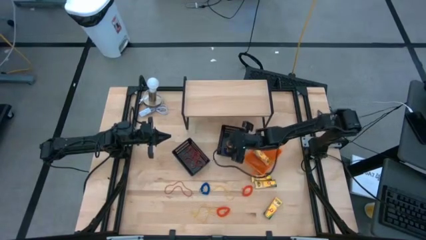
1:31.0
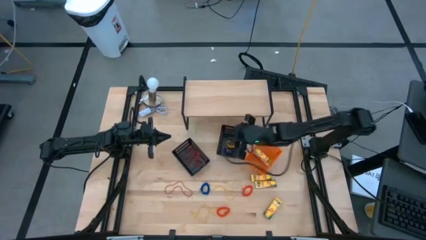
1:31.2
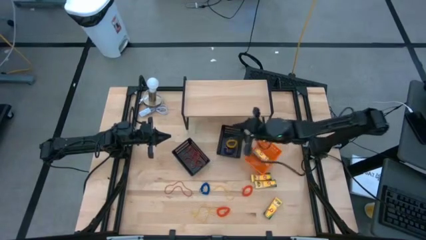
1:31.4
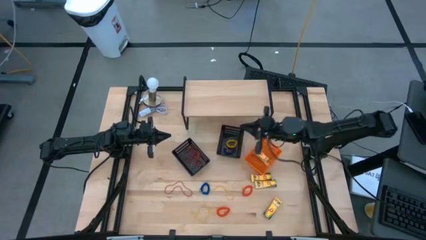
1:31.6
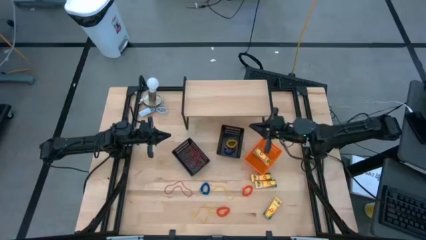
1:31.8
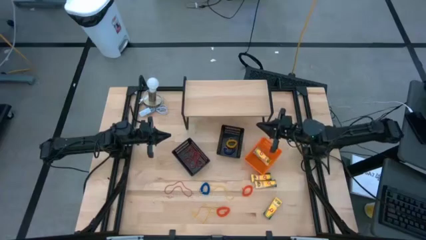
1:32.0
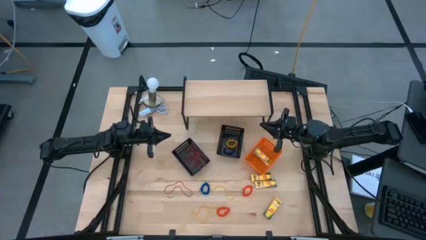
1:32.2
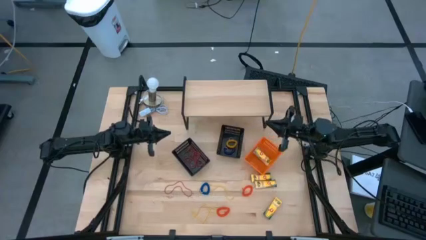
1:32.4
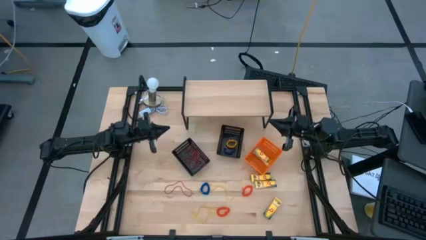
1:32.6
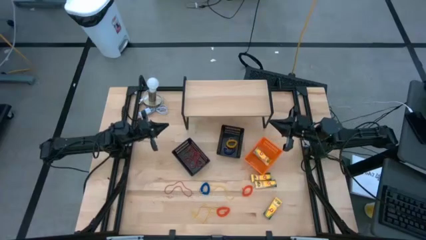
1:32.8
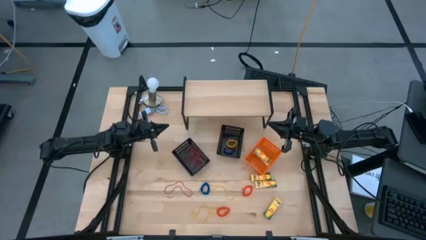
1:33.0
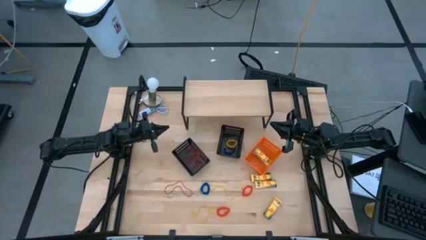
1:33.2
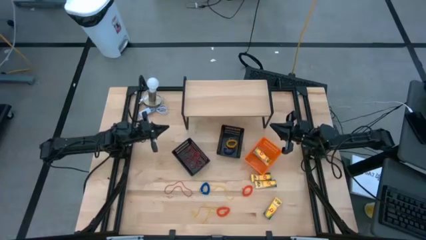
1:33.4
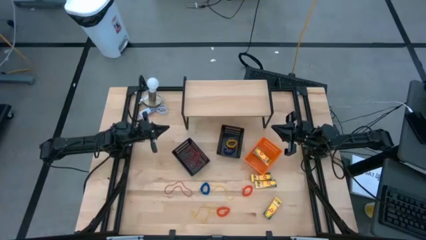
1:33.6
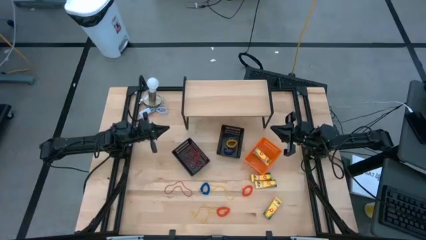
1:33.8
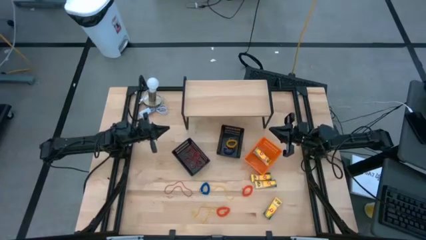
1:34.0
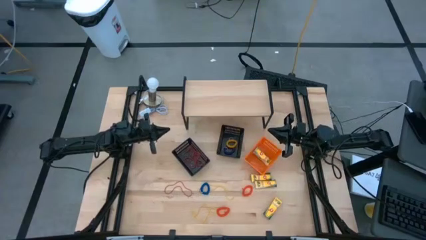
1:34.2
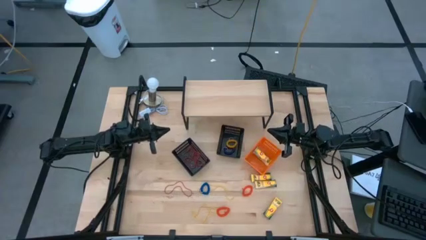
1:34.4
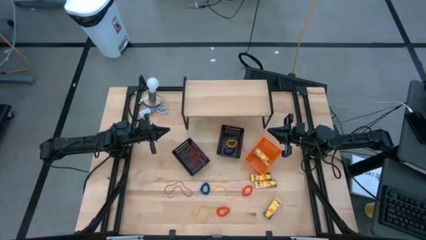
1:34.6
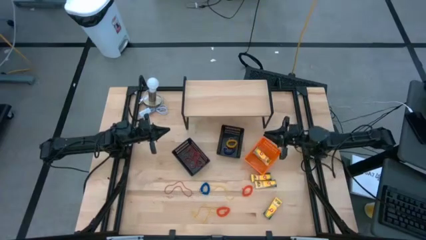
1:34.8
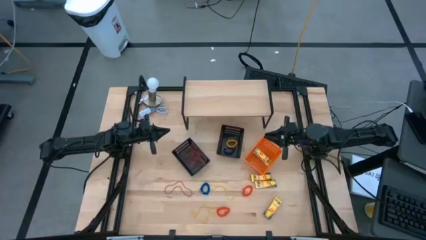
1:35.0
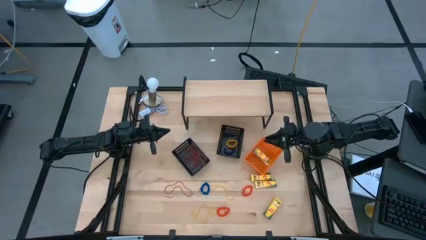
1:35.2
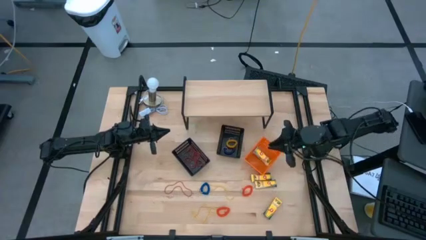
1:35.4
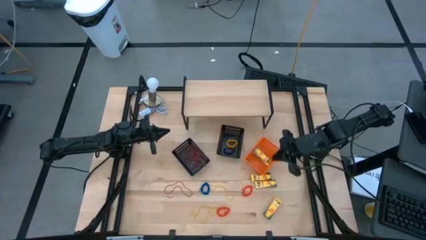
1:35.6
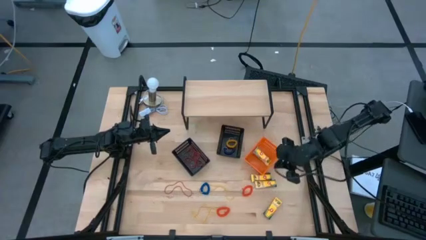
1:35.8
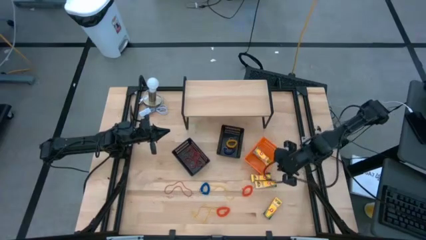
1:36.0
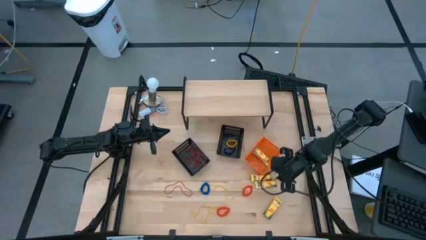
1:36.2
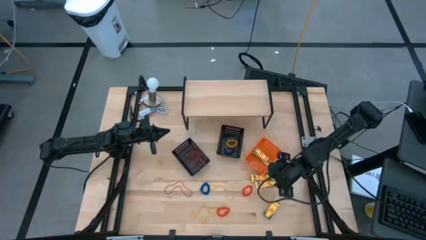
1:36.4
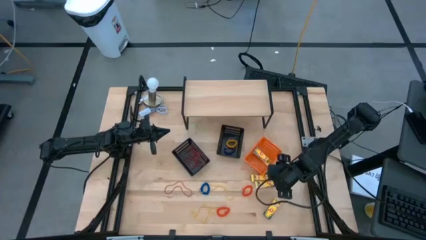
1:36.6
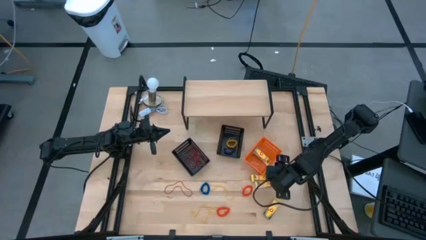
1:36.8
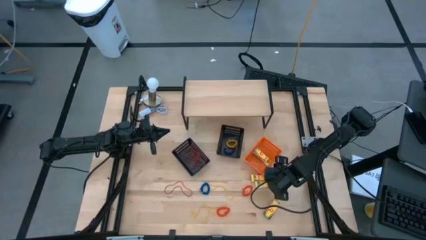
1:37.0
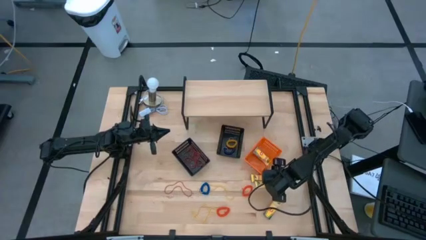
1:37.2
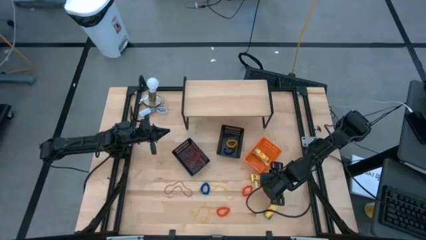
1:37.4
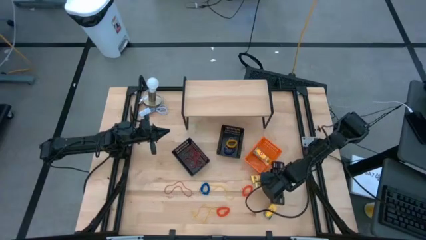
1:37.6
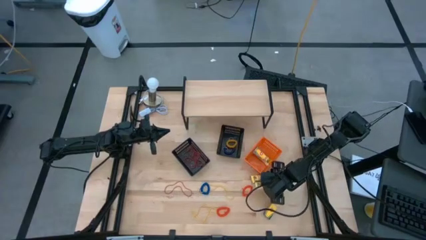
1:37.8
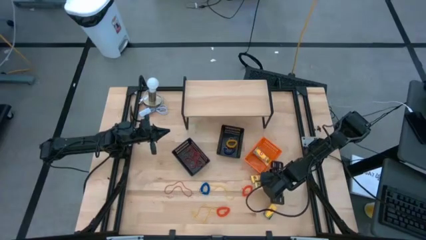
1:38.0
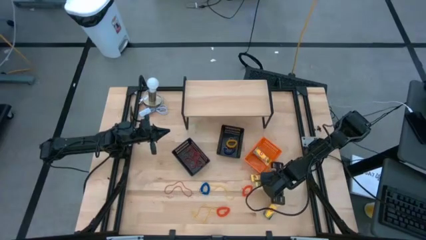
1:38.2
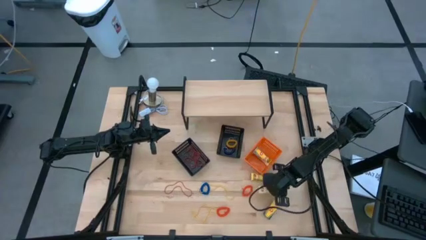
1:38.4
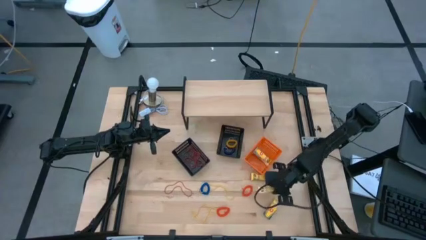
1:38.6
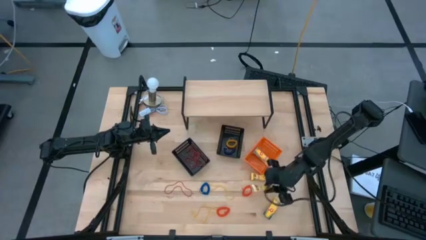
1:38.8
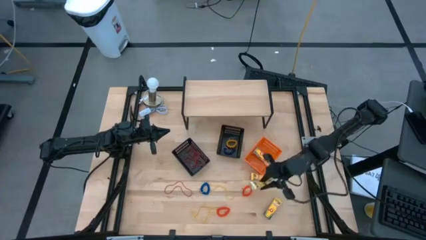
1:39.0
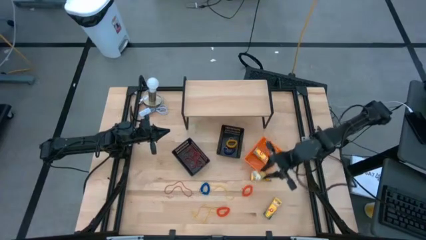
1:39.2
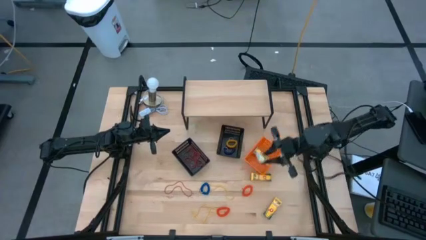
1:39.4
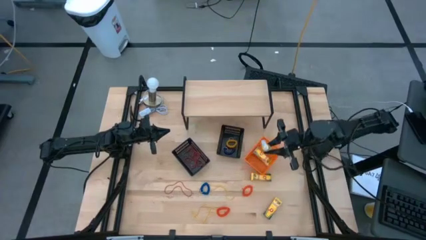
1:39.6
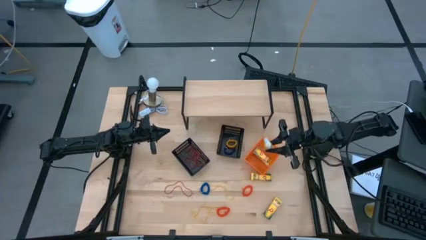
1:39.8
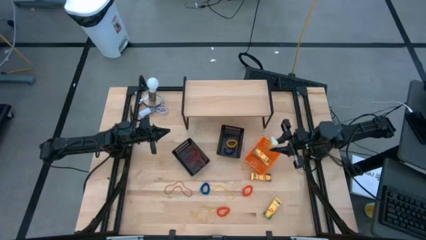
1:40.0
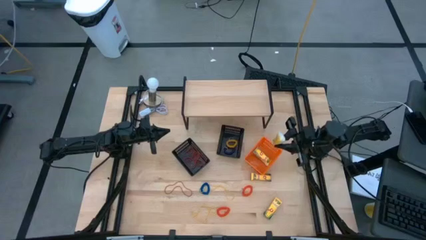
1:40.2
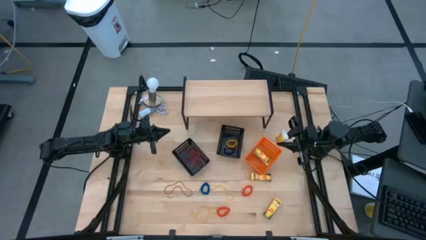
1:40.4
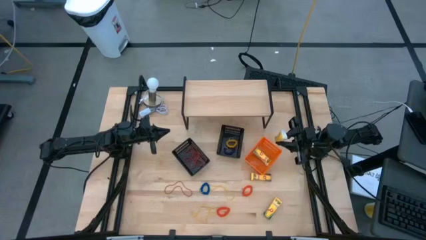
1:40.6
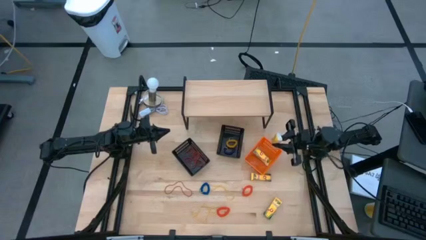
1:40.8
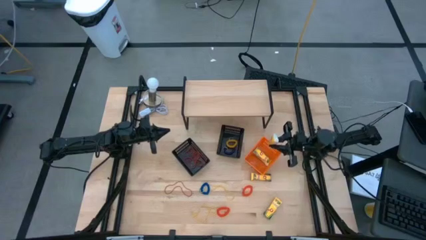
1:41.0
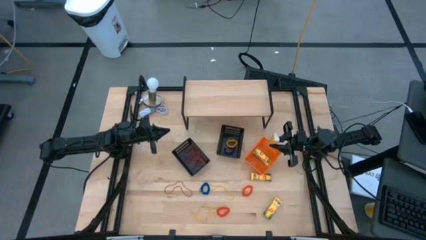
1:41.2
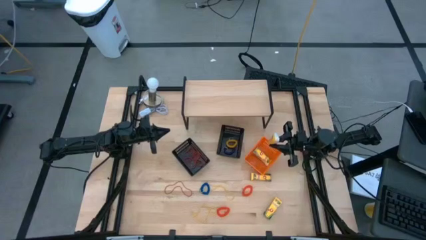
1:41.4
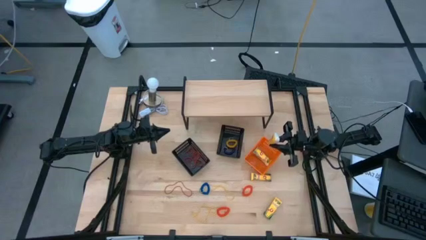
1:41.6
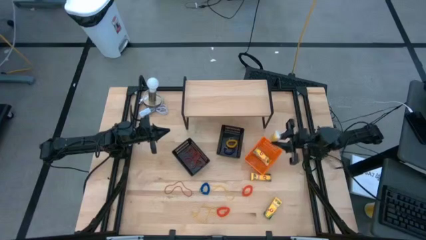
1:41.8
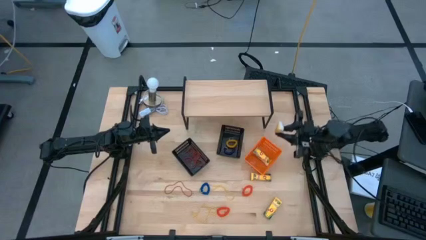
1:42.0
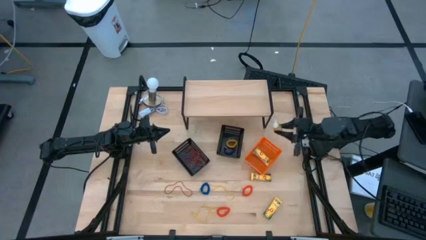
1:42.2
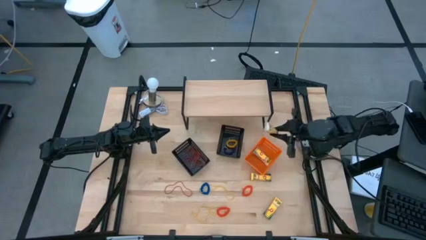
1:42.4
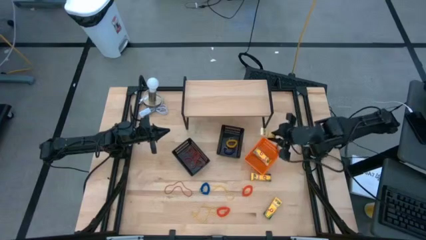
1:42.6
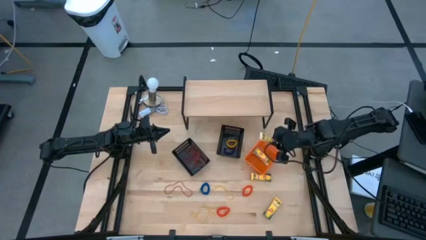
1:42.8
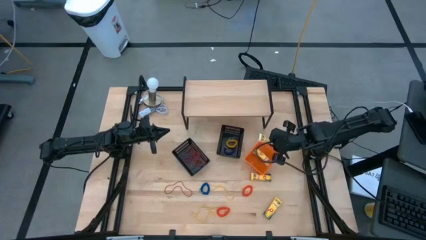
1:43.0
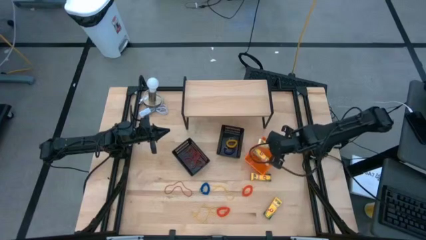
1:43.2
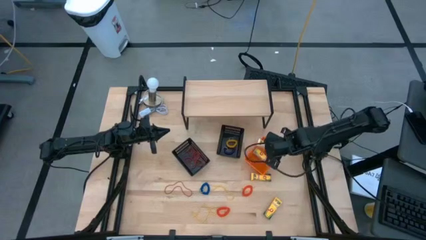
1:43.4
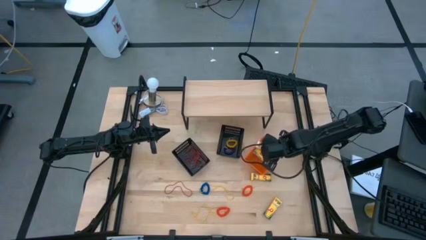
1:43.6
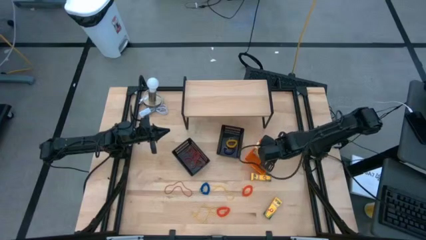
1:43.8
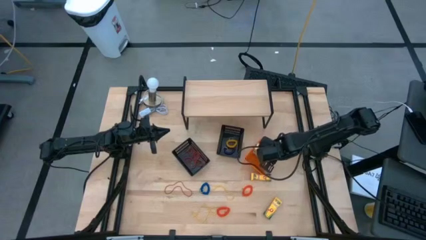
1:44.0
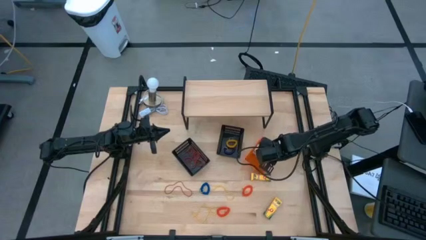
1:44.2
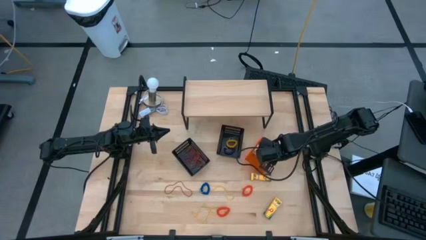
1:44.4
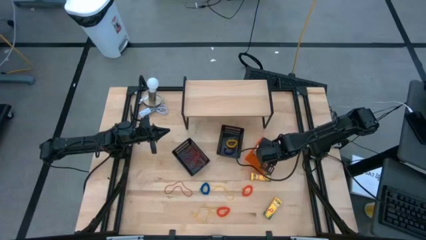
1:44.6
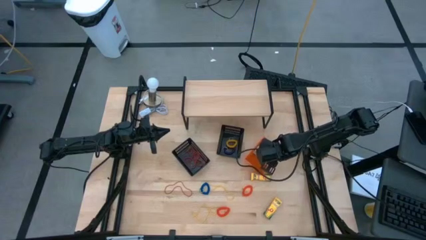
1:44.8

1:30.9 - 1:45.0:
Task: Pick & Place Office Desk Supplies
Put the crayon box into the orange bin
